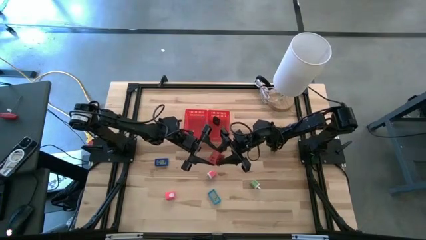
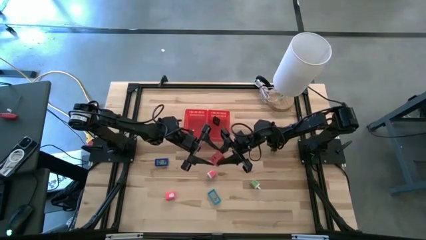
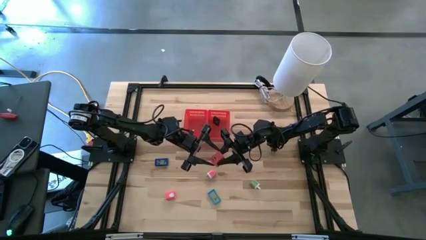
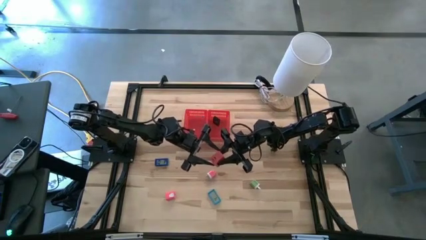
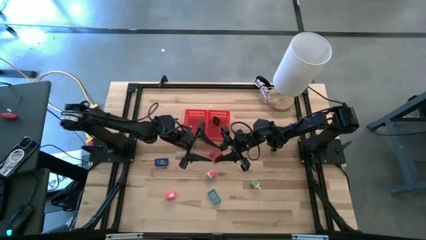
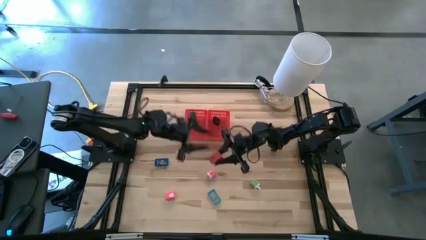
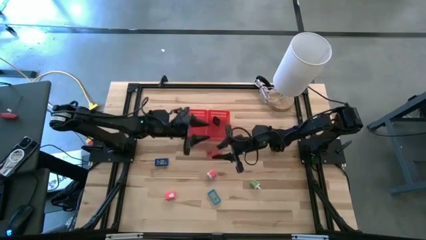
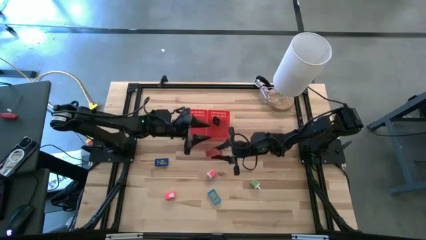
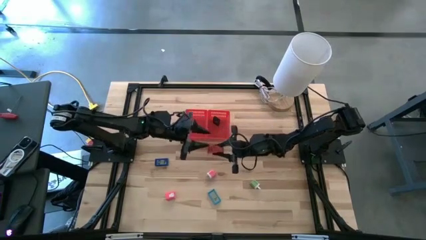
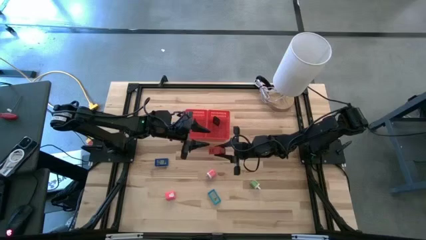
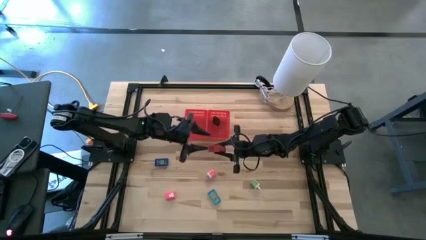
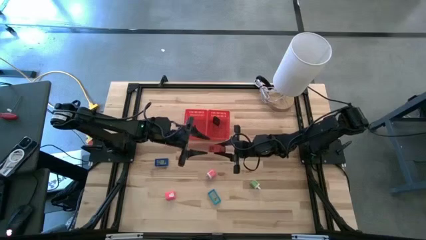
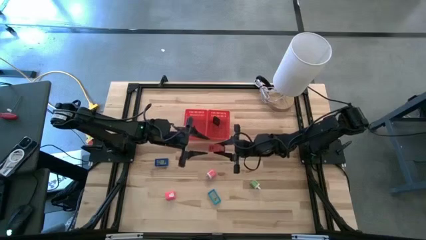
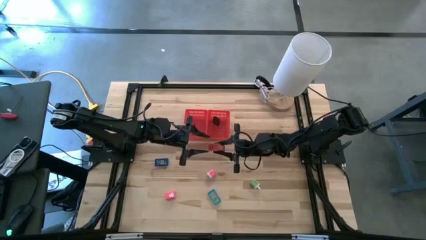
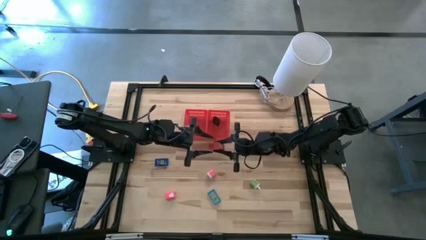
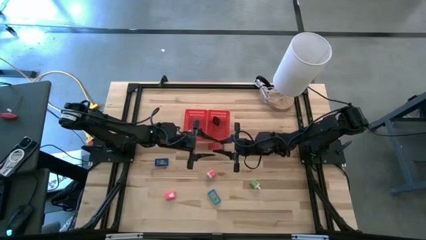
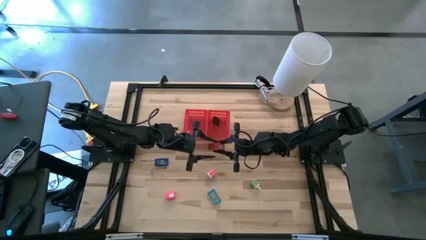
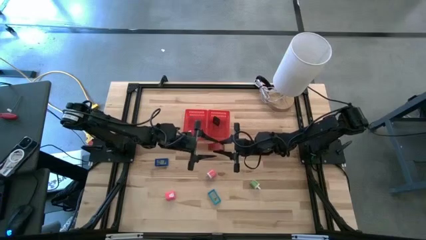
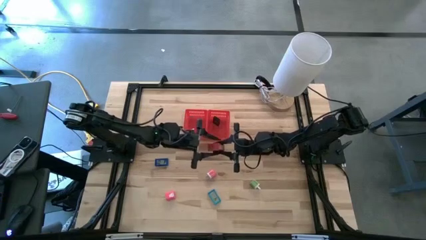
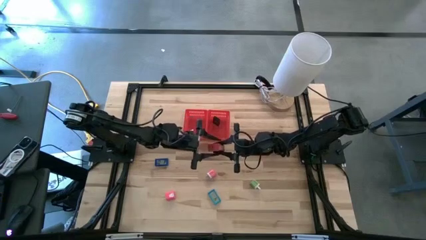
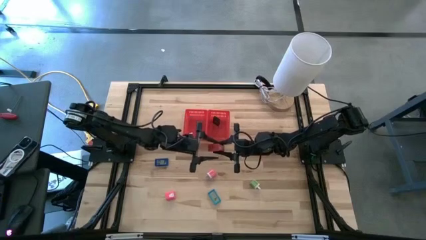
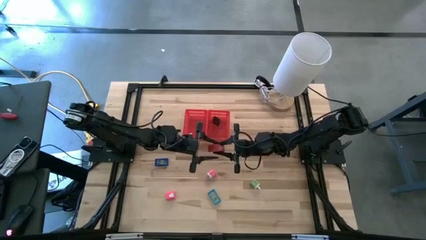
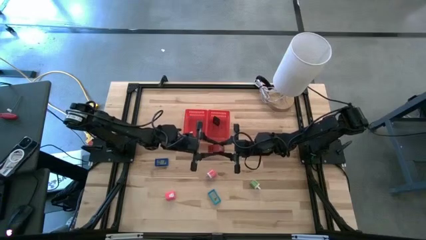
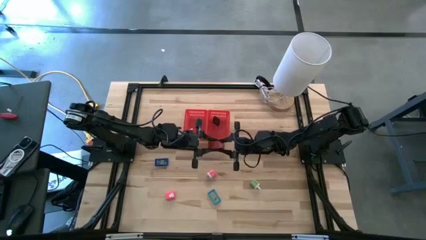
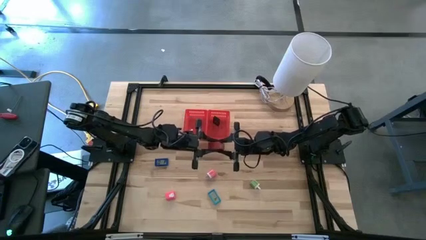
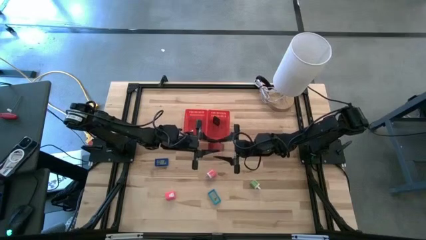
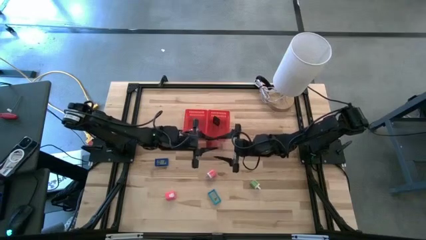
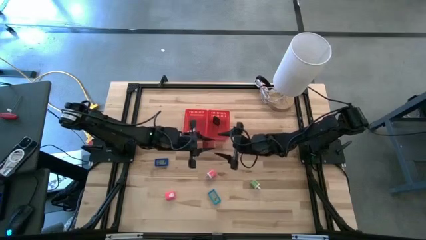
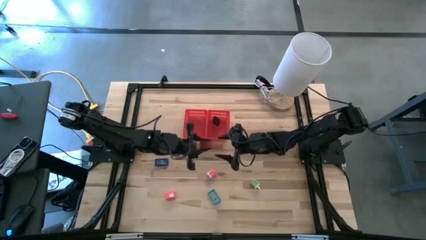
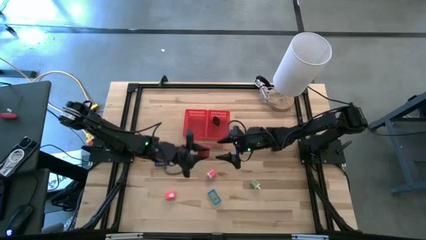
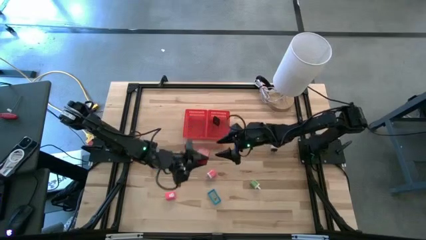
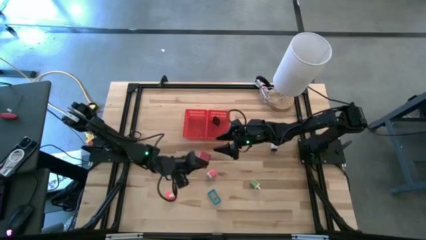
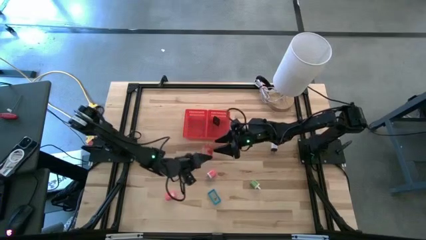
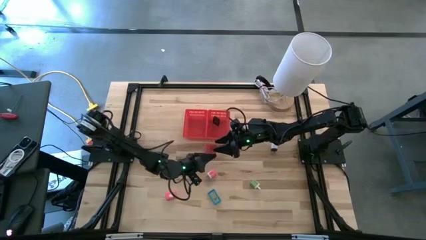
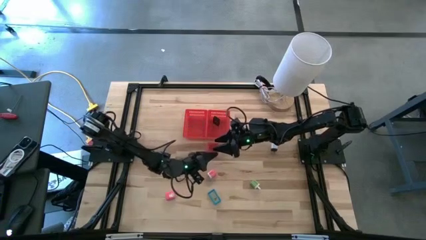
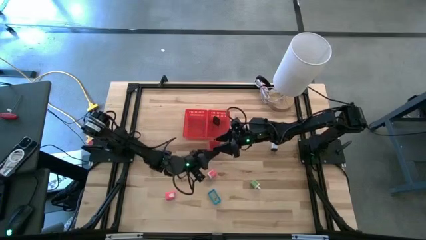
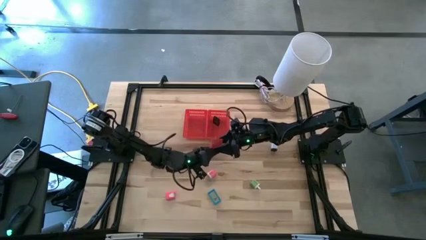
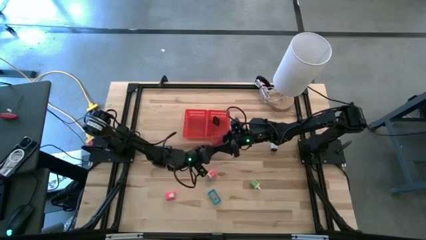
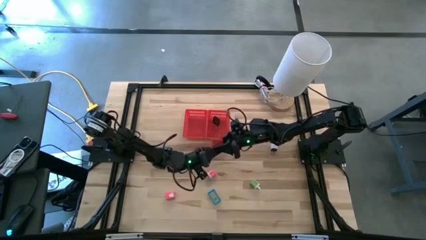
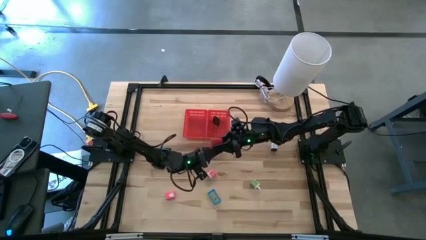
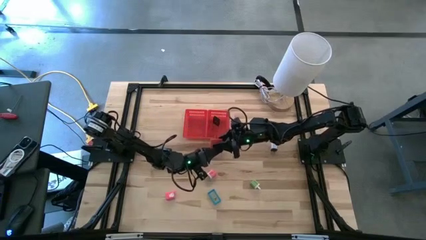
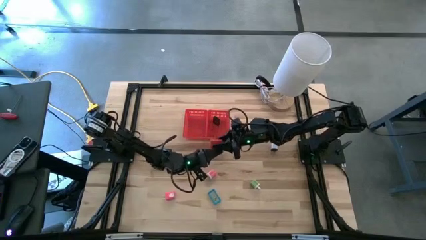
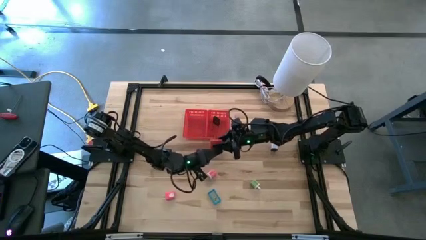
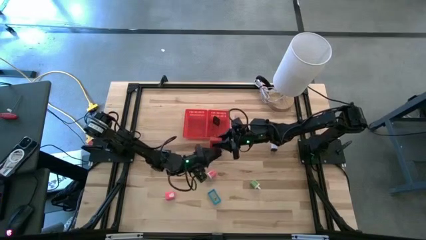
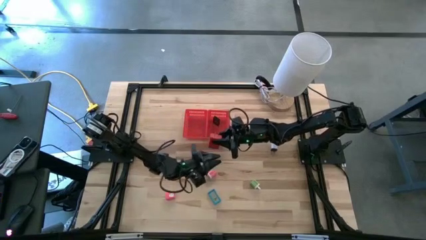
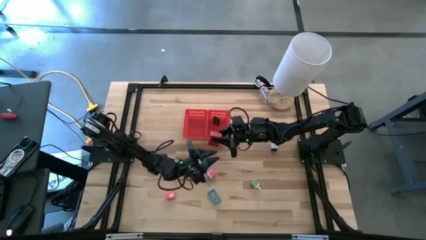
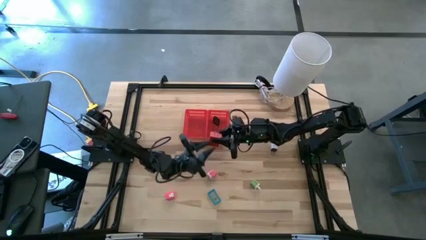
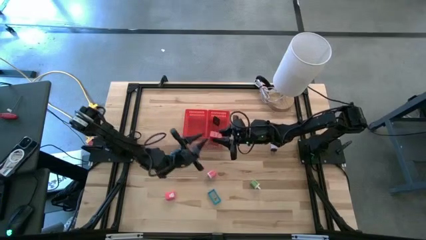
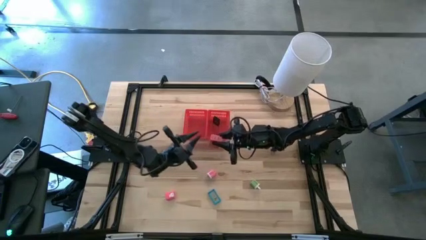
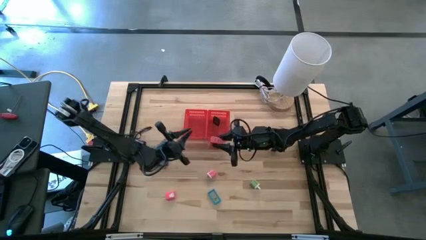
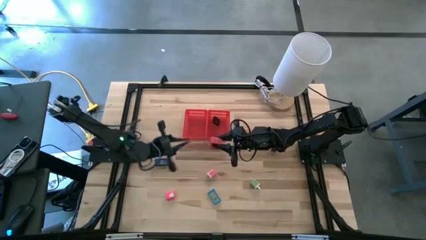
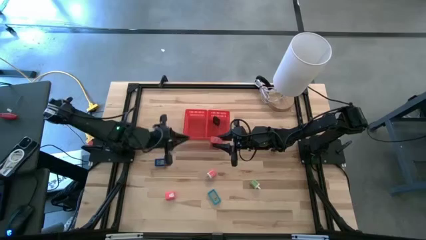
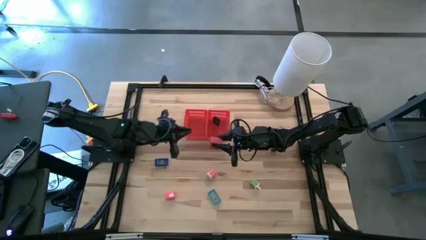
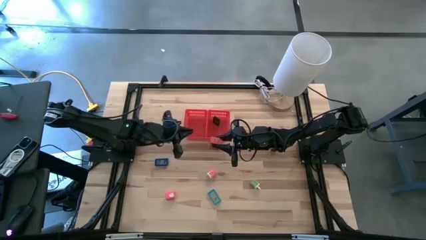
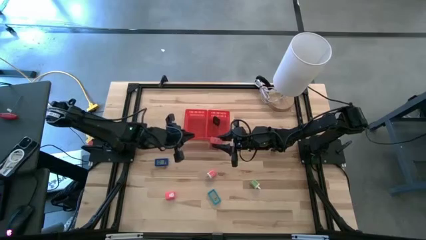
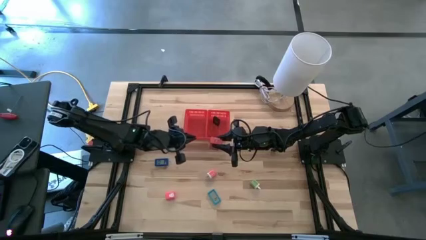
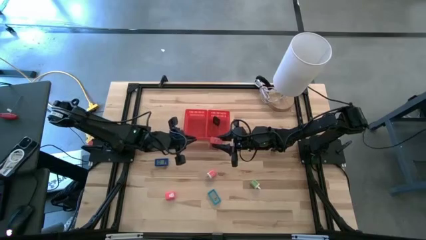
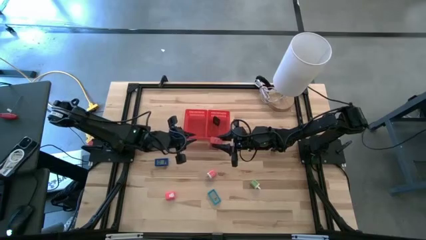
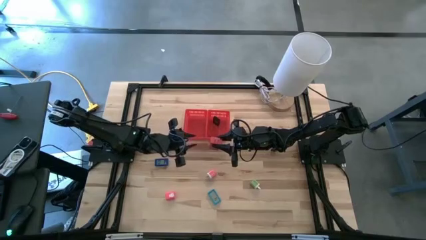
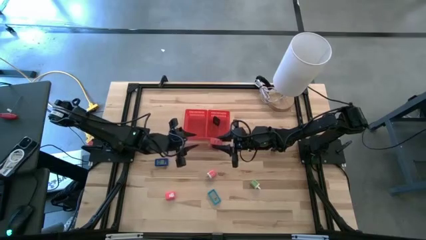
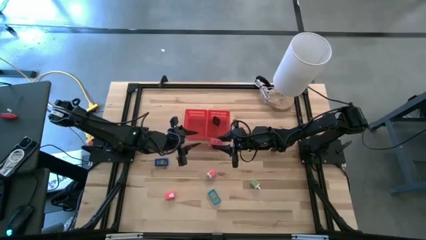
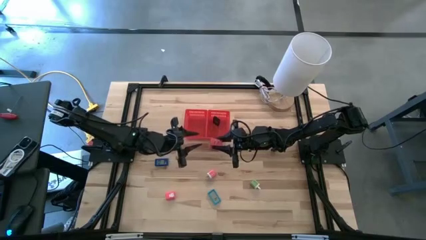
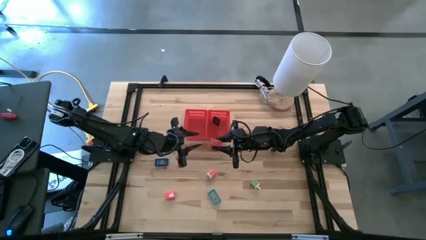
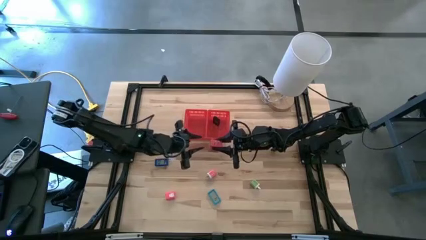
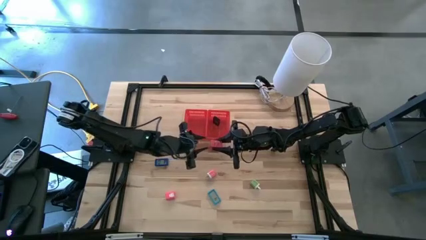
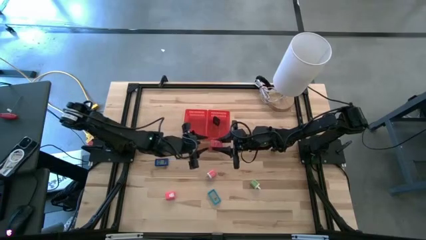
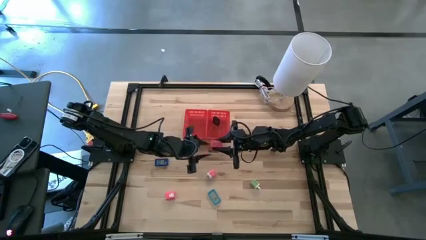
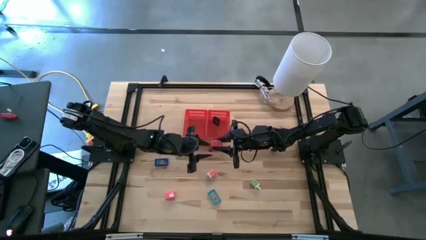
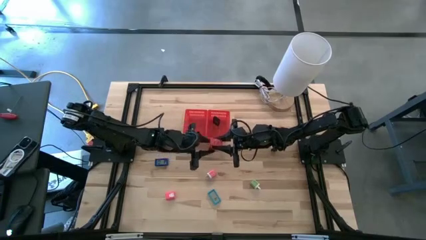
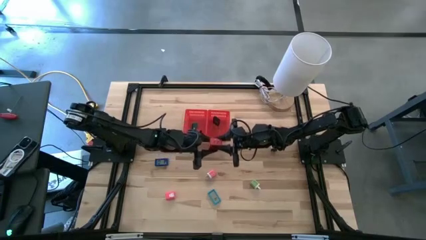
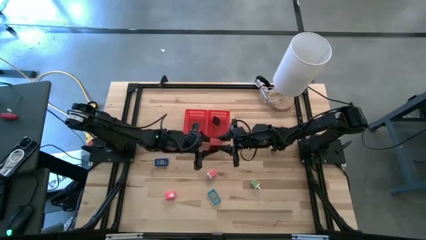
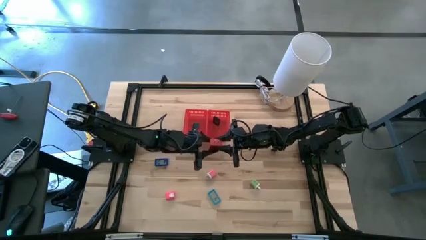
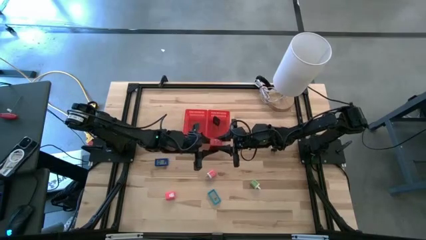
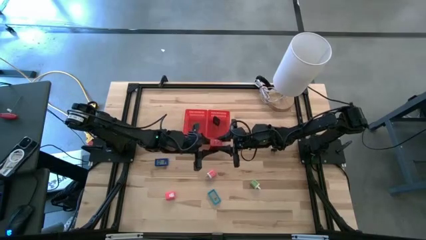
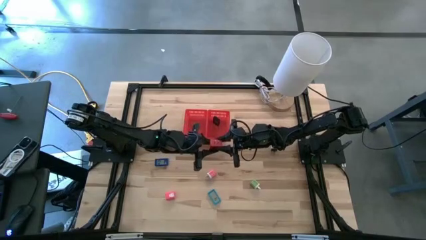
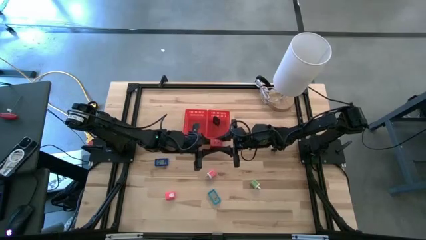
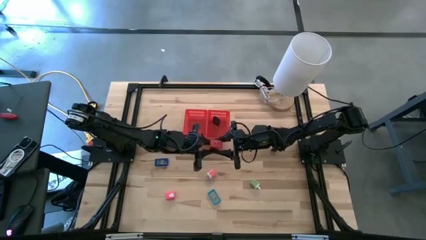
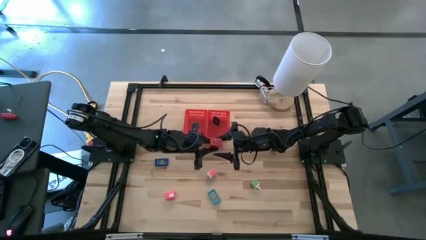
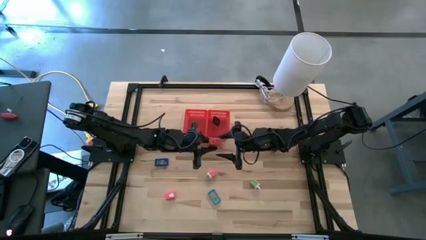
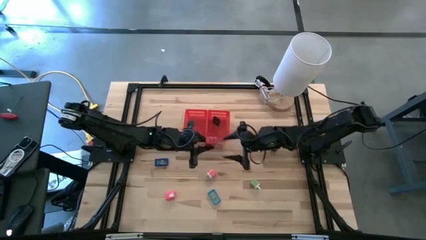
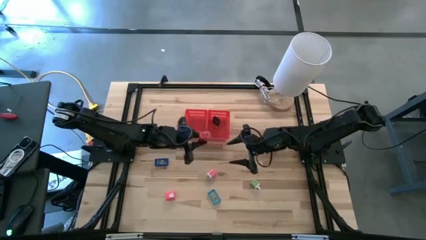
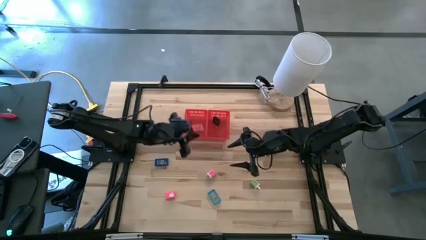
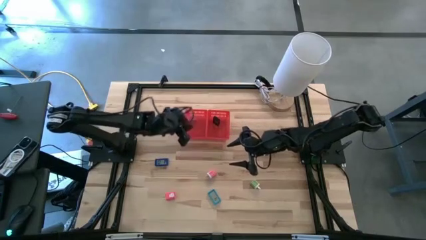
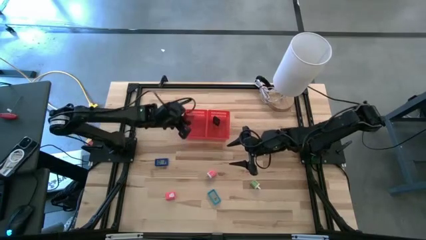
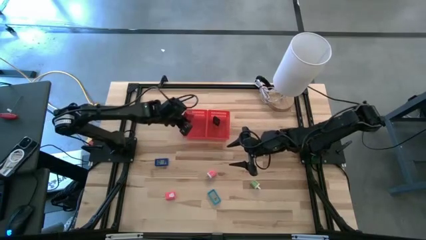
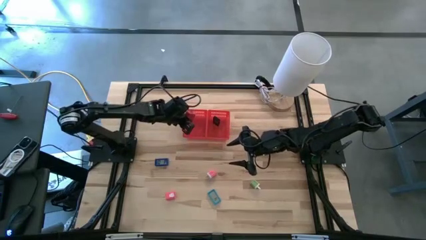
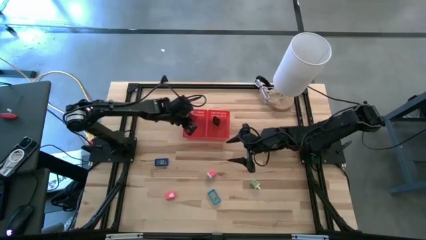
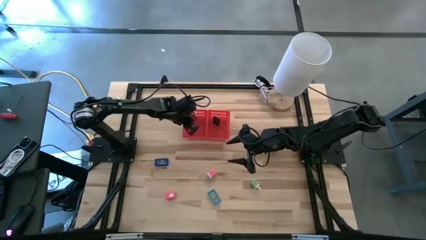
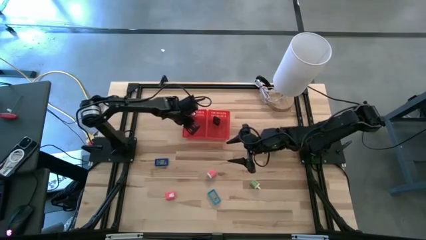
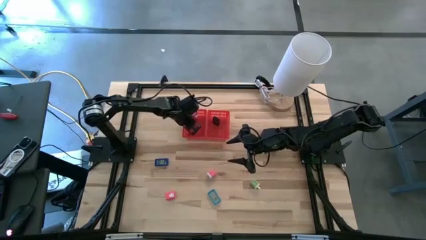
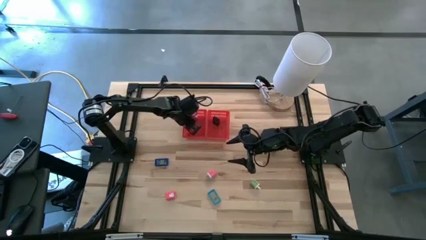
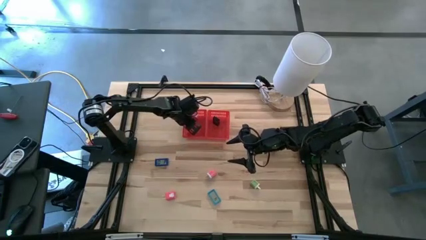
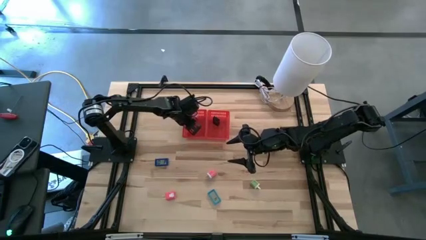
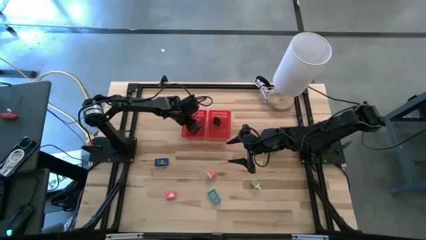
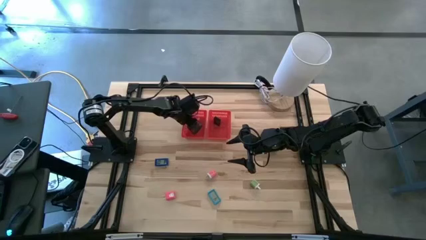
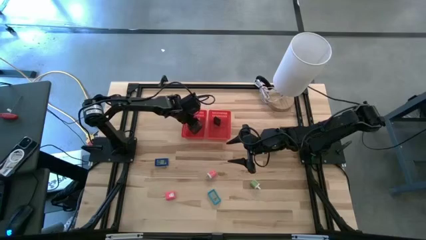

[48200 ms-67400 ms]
Task: Pick & Place Office items
Put the red charger adapter into the left red bin
